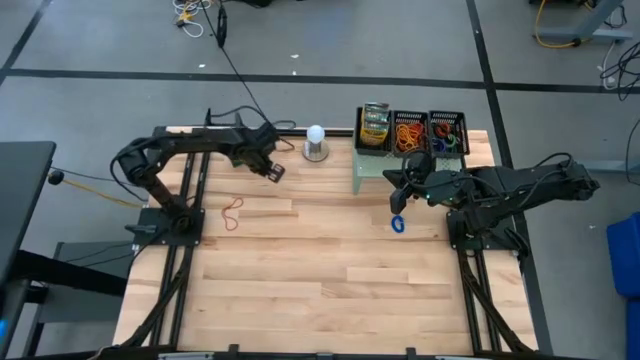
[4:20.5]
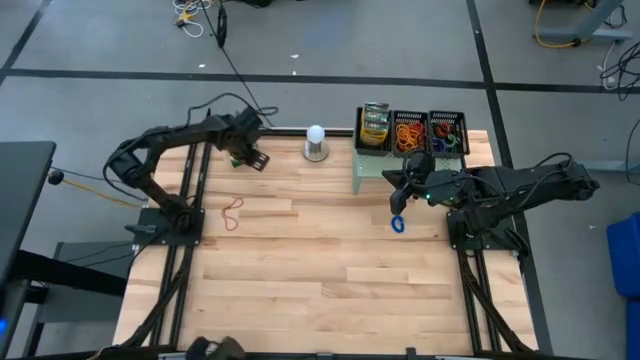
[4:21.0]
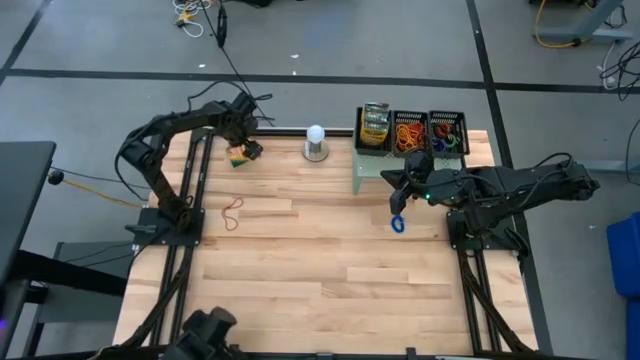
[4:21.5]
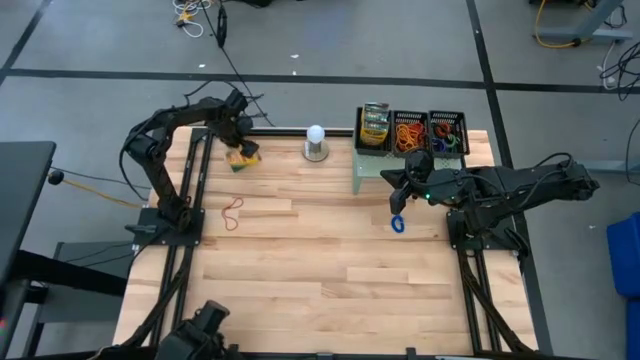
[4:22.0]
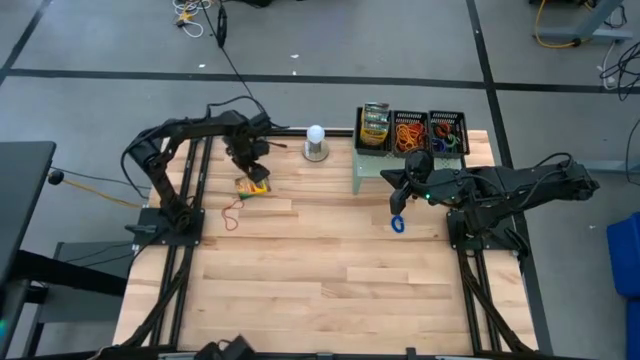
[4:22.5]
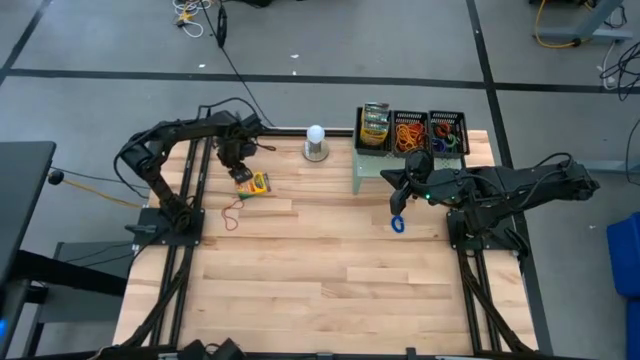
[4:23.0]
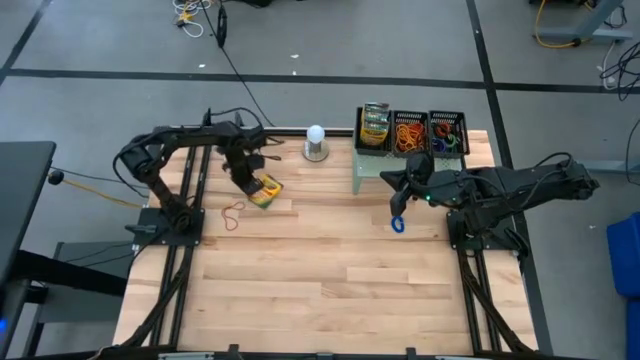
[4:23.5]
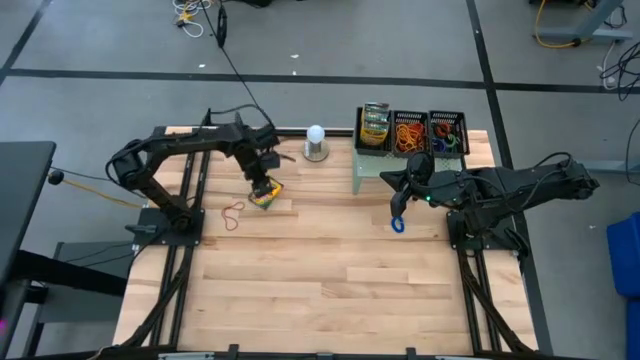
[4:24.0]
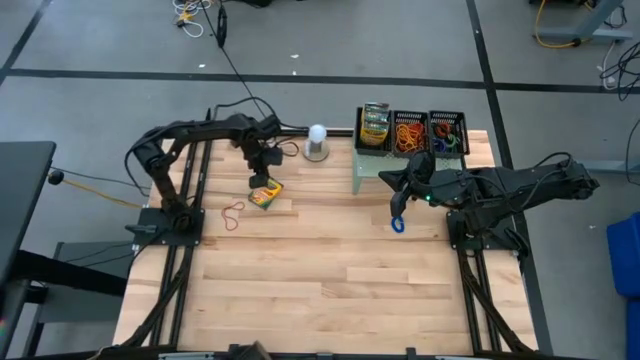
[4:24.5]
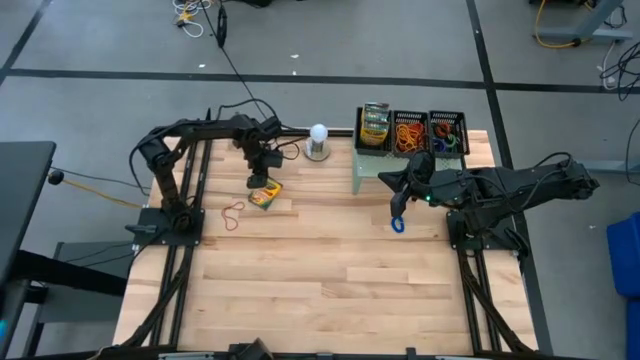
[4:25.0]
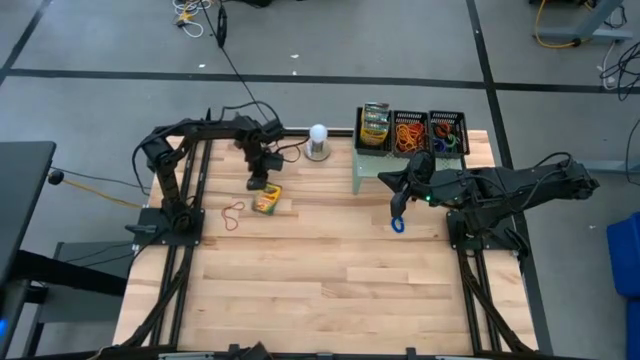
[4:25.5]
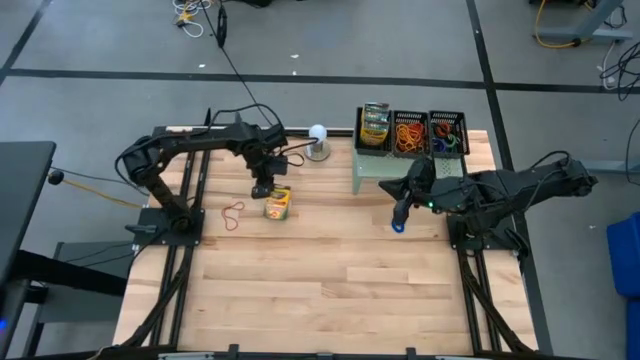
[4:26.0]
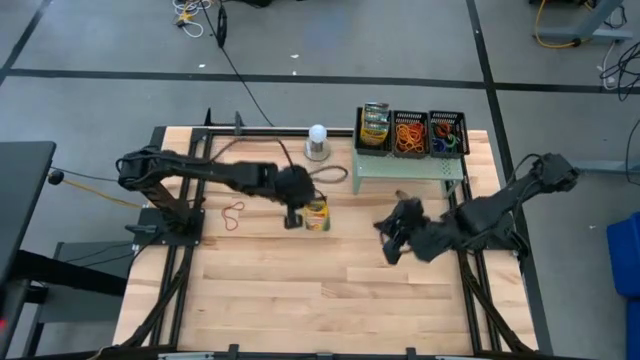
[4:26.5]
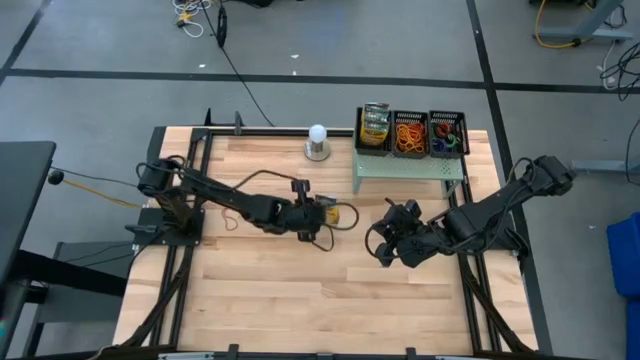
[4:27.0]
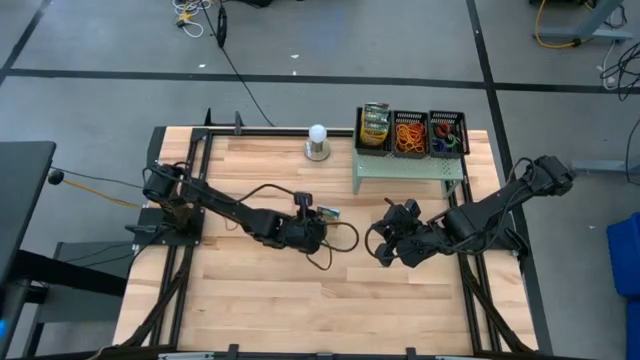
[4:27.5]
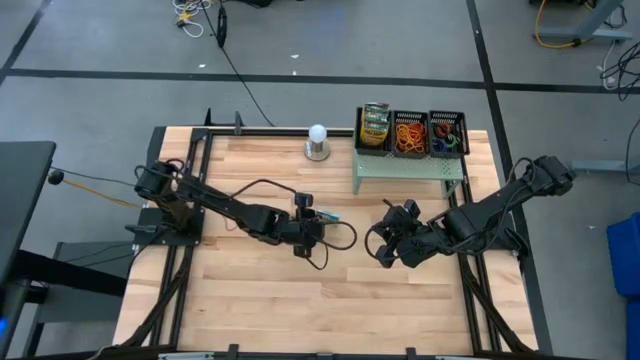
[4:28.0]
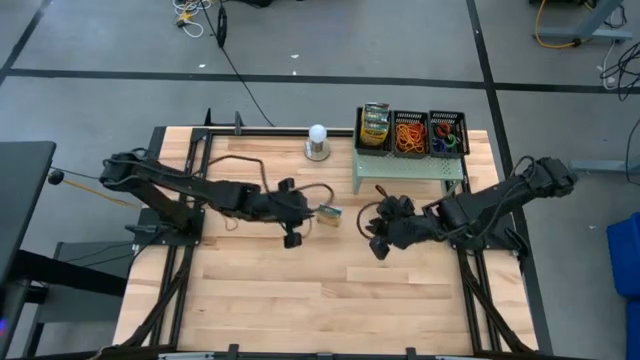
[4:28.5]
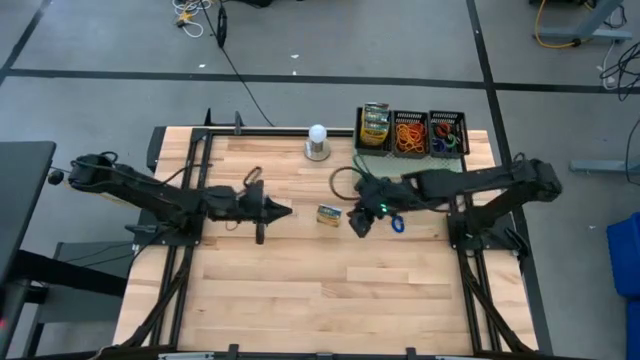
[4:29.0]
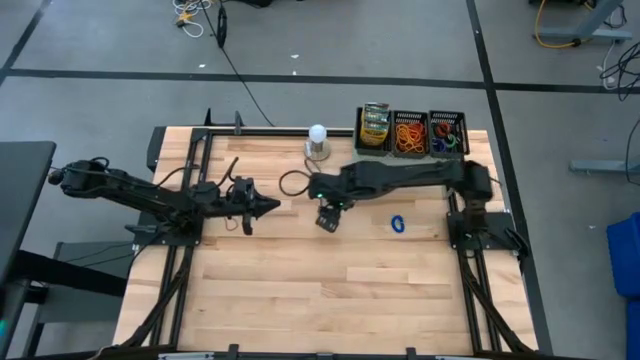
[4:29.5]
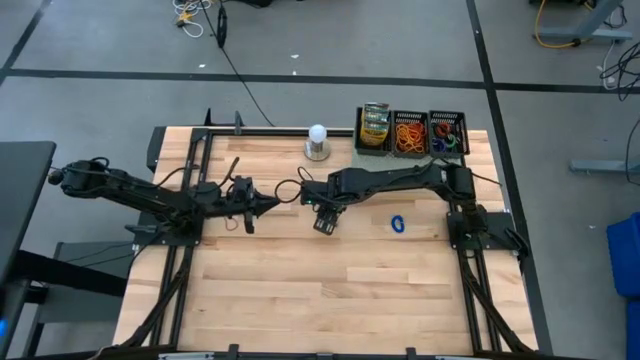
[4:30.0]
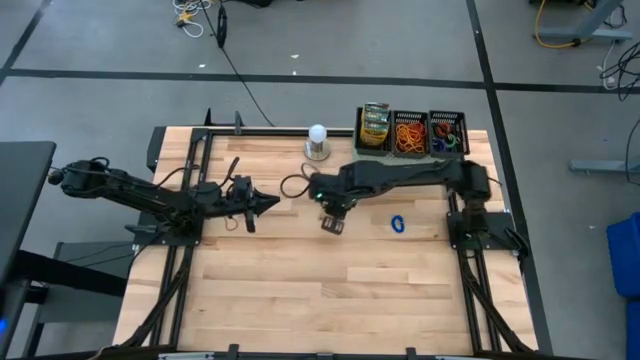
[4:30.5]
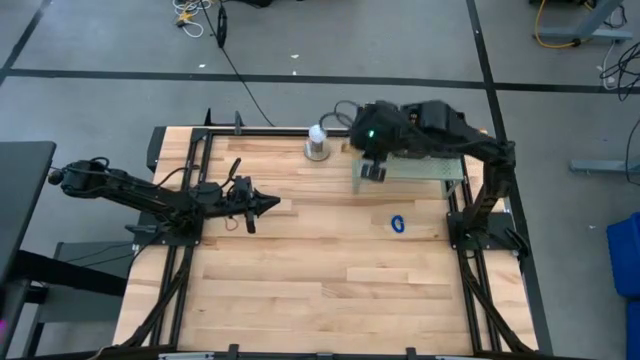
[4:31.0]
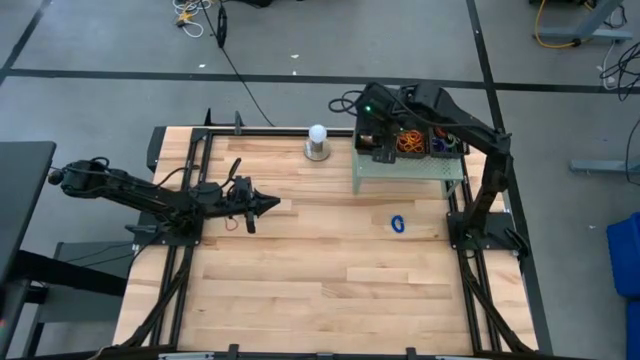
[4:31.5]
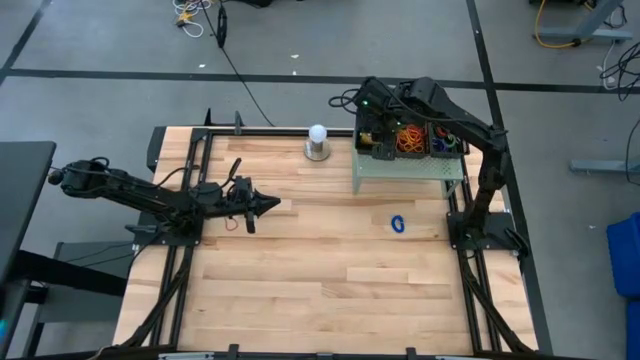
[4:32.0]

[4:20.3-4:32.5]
Task: Pick & Place Office Desk Supplies
Put the crayon box into the left basket on the shelf

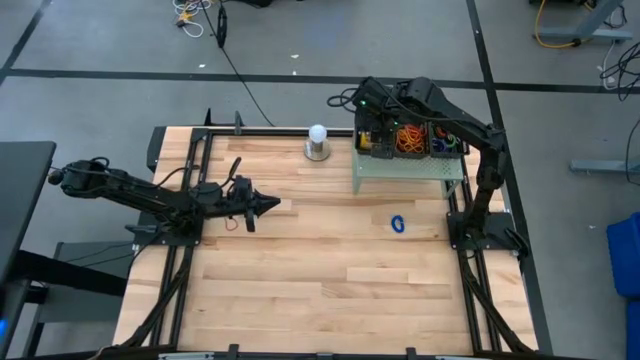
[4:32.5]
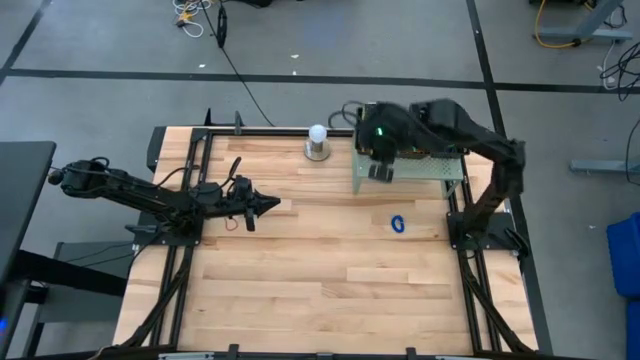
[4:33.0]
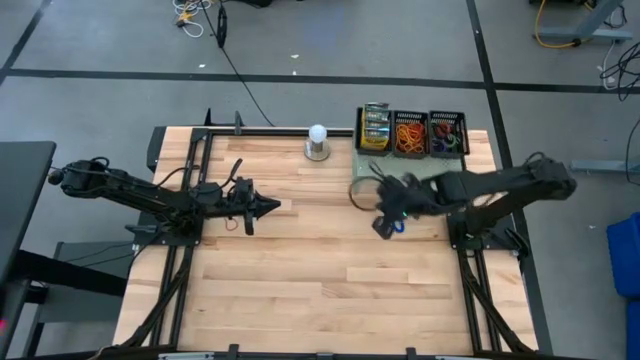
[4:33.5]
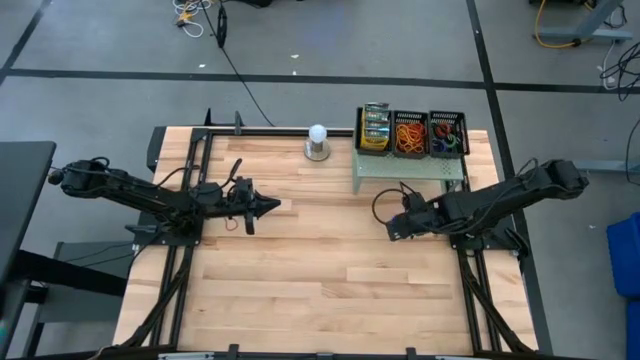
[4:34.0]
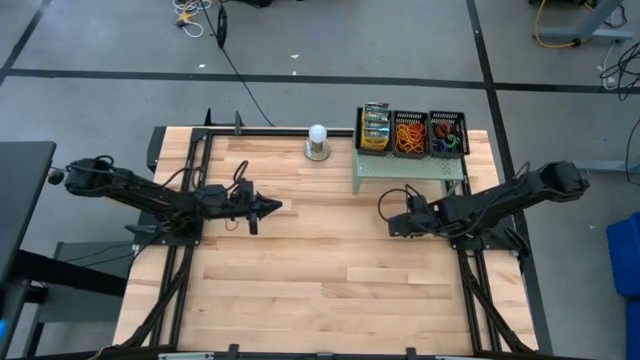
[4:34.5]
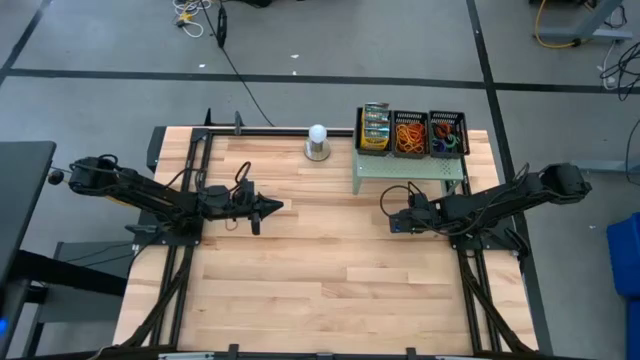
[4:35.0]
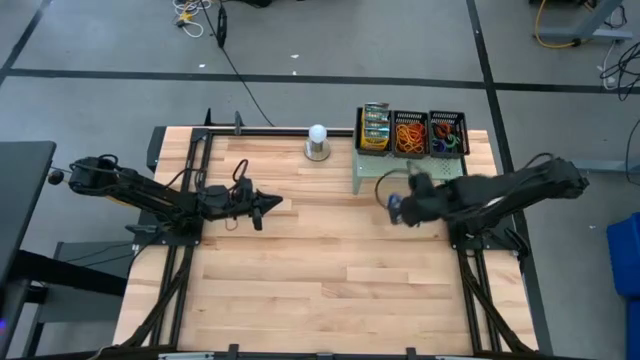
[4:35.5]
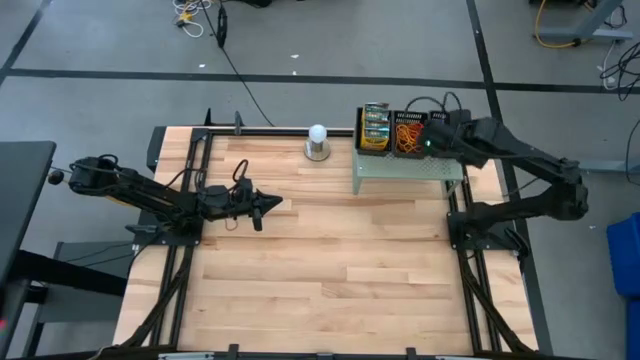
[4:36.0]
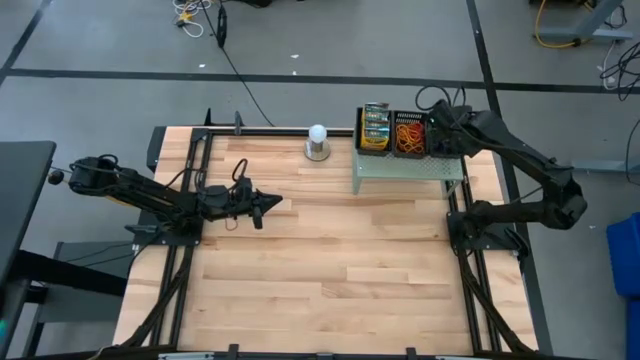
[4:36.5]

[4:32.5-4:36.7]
Put the blue spring keychain into the right basket on the shelf

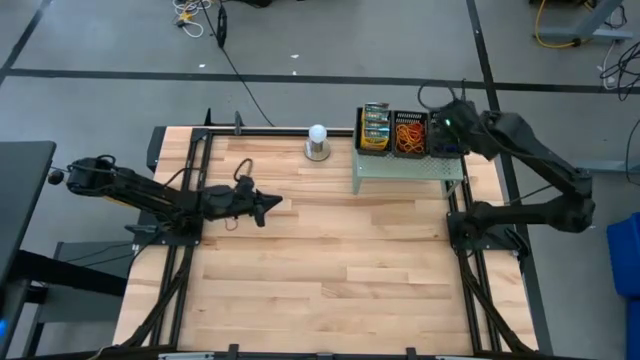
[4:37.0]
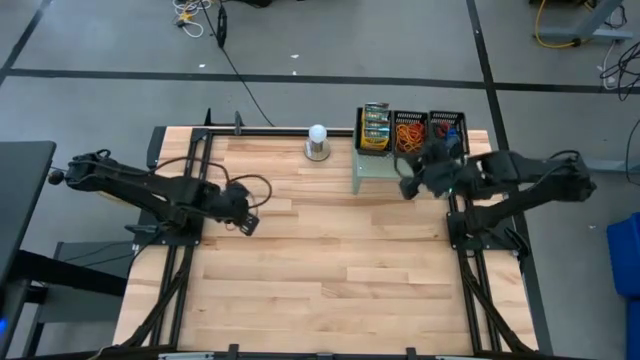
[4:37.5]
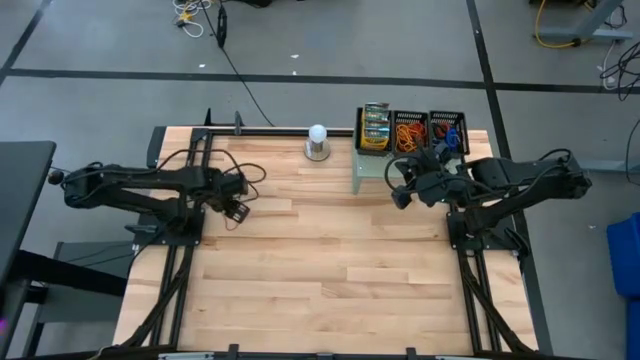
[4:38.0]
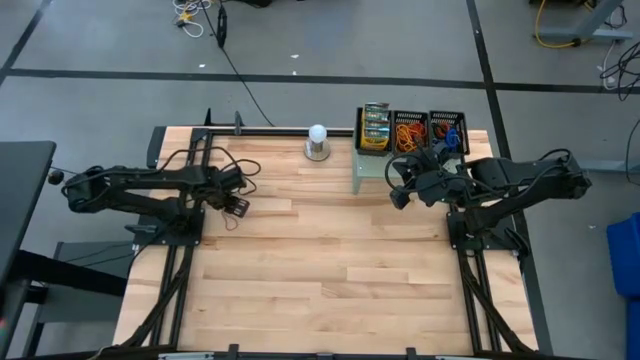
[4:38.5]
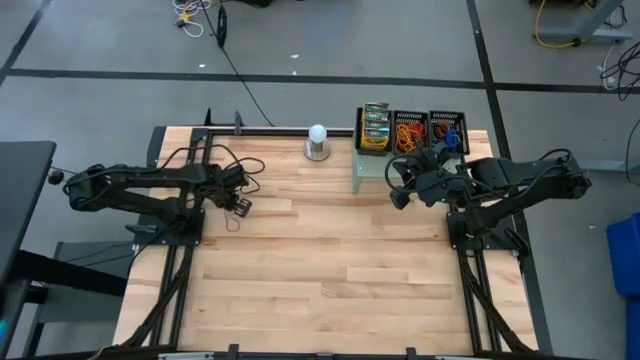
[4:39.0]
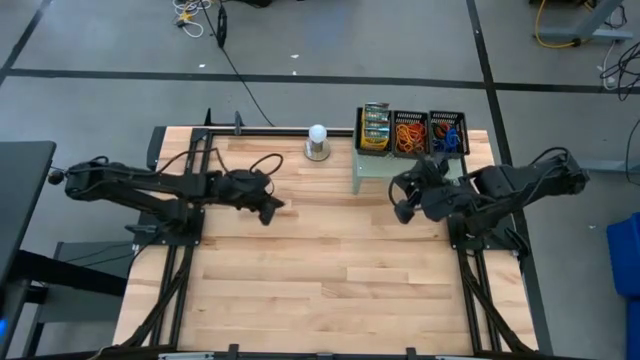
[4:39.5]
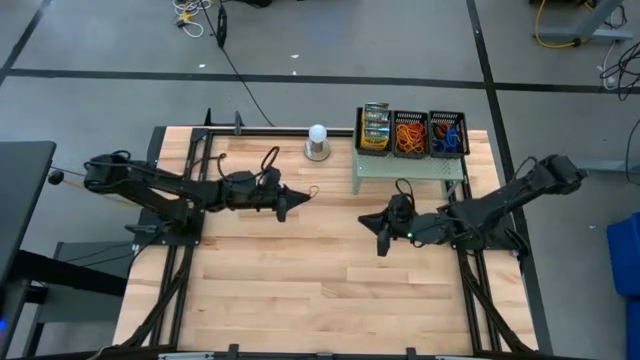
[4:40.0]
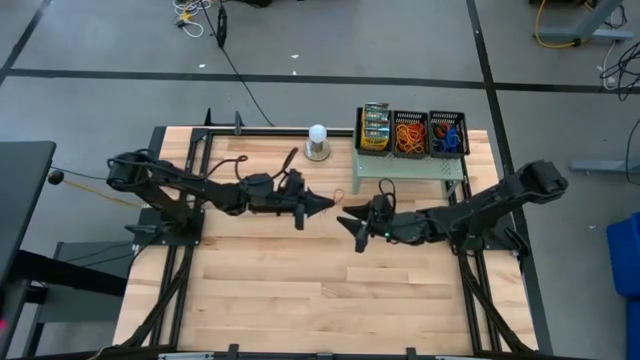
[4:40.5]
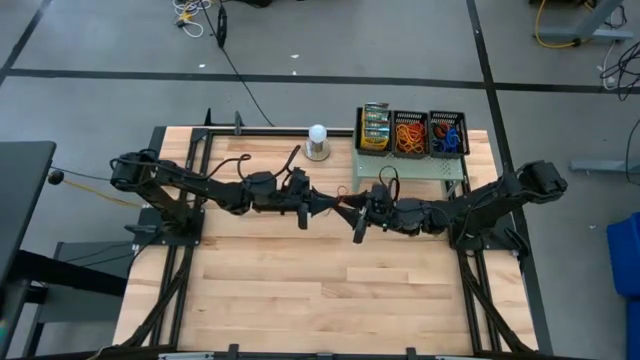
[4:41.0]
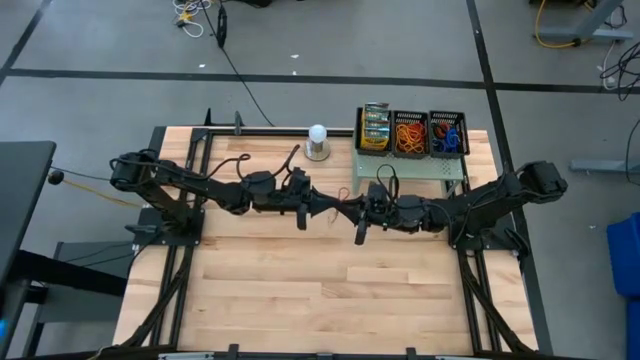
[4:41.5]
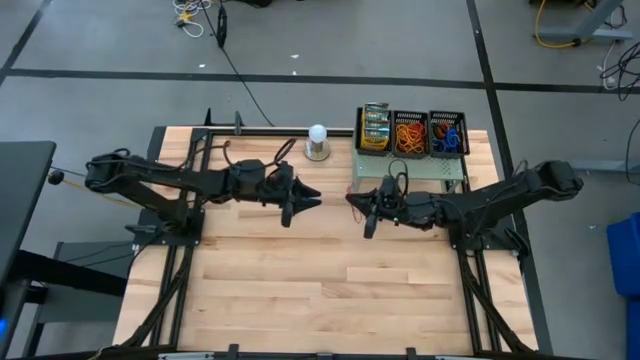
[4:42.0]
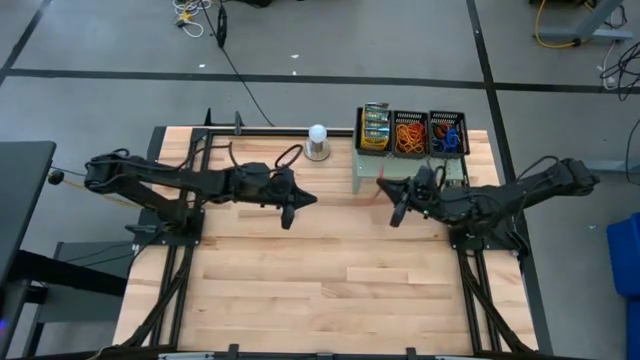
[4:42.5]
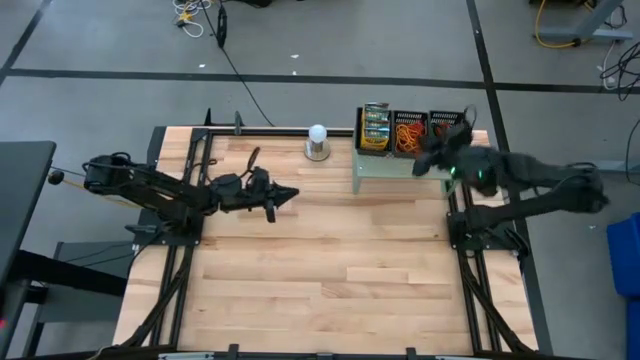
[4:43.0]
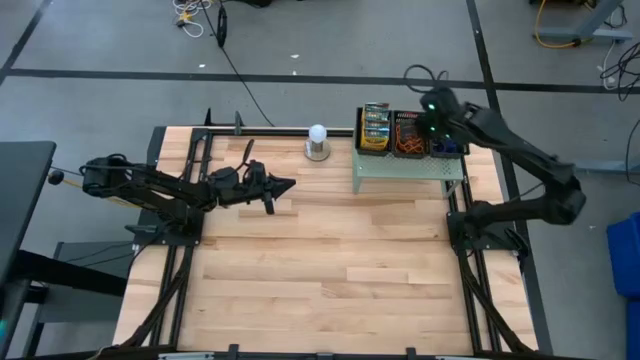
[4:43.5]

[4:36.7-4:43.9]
Put the red rubber band into the middle basket on the shelf
